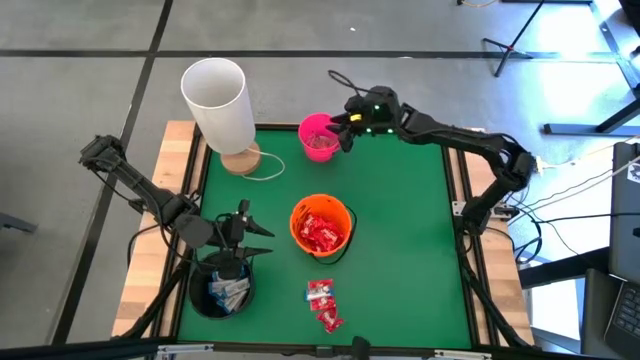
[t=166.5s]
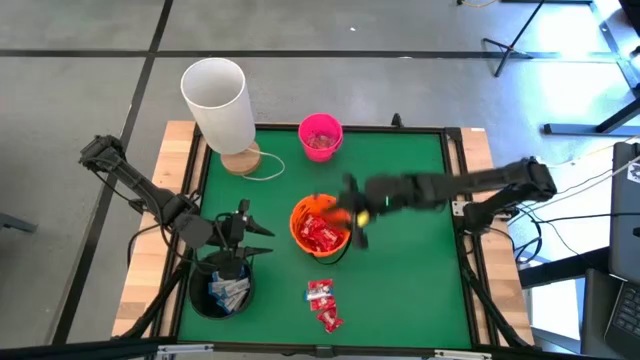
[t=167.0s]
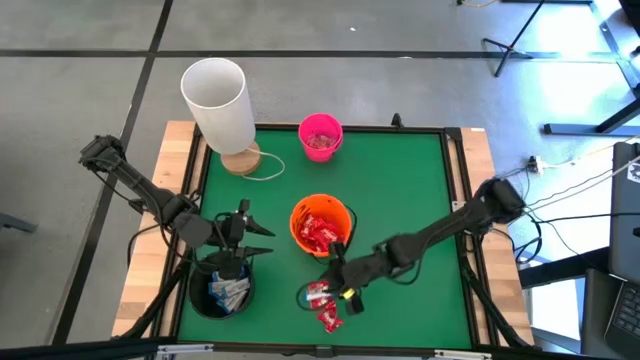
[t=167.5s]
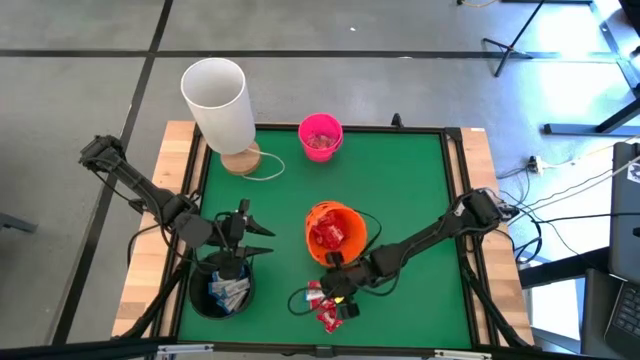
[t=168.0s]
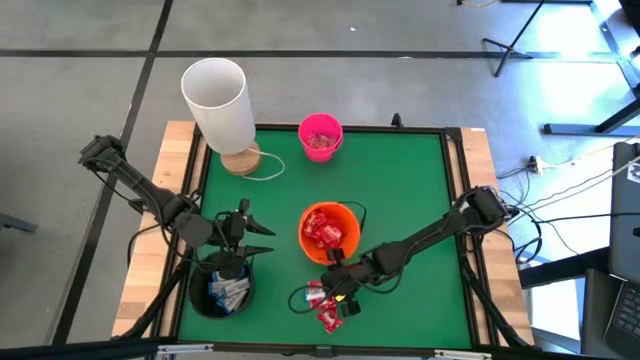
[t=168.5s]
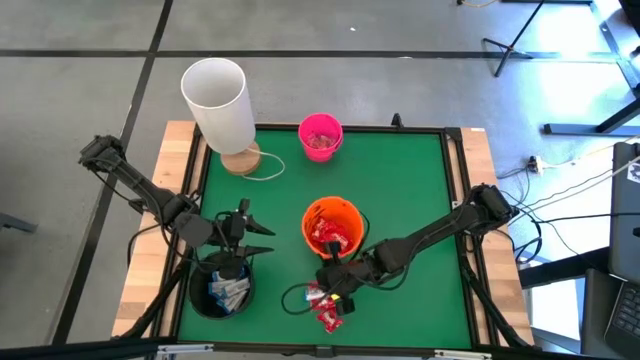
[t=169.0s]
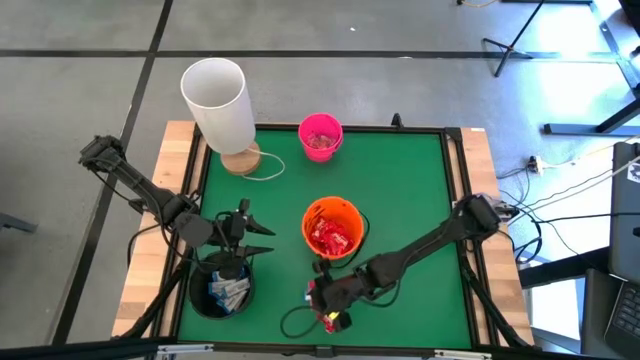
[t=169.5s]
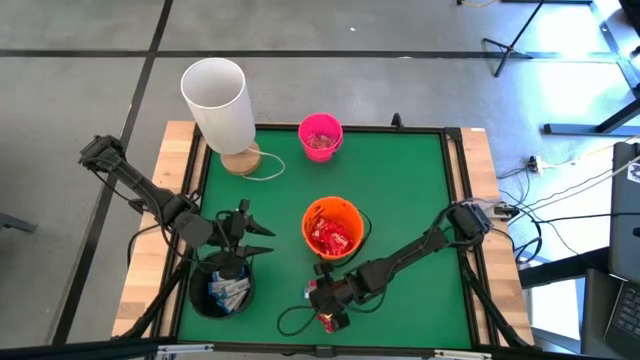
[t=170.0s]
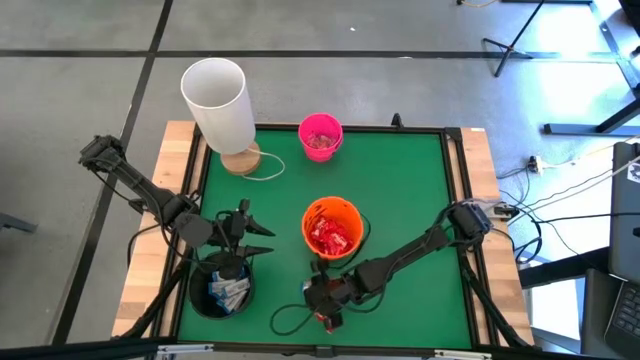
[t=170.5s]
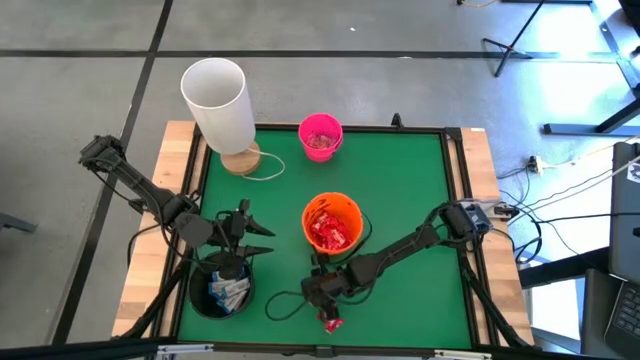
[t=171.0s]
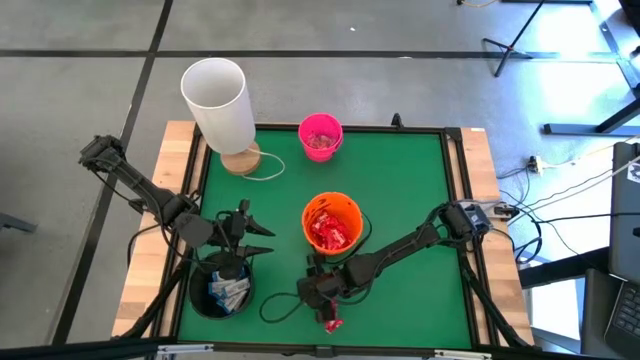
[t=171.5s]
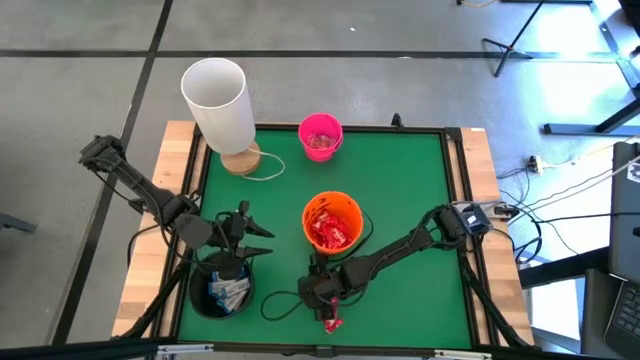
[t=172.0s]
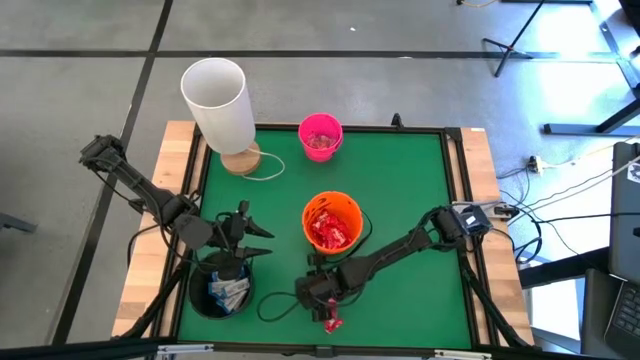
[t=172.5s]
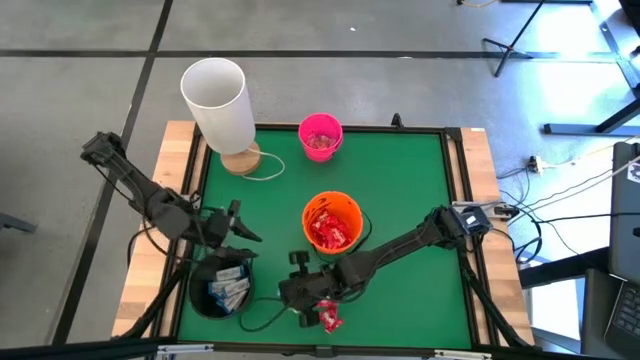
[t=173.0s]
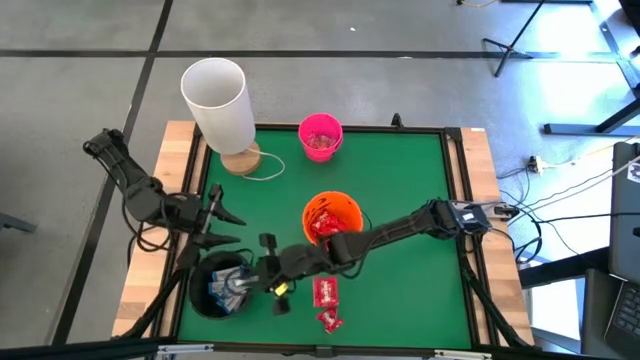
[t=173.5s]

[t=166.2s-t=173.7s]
Task: Sort candy
Put the white chocolate into the black bucket

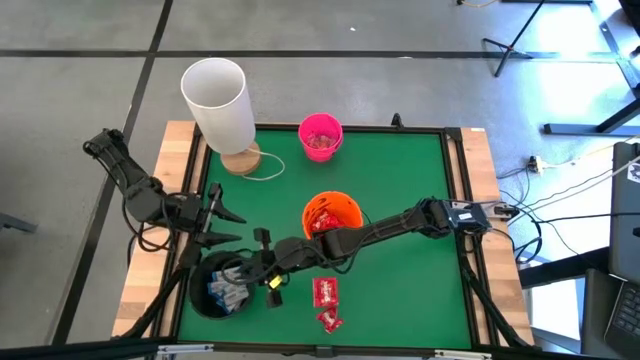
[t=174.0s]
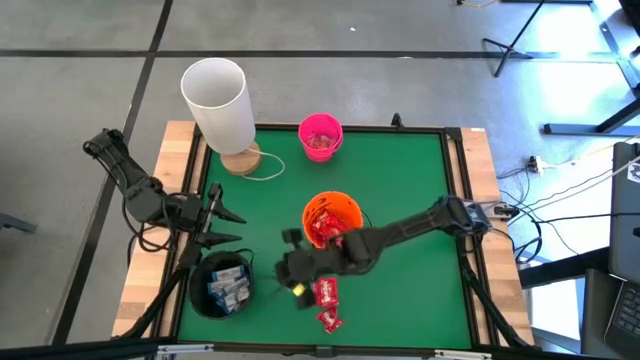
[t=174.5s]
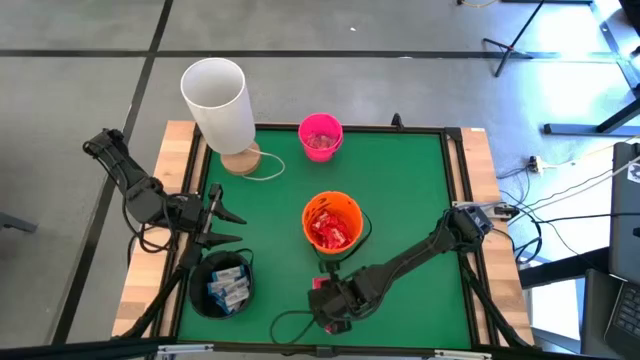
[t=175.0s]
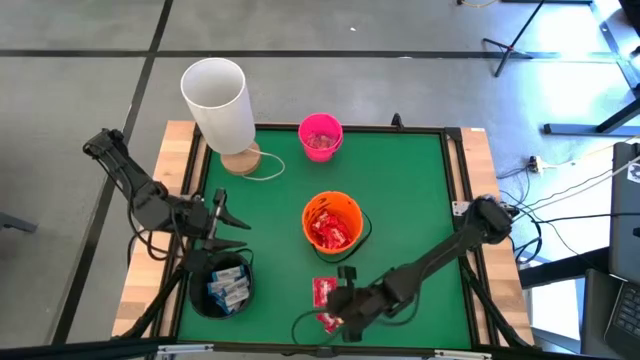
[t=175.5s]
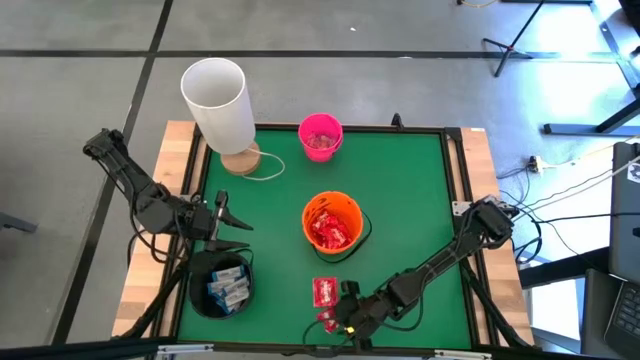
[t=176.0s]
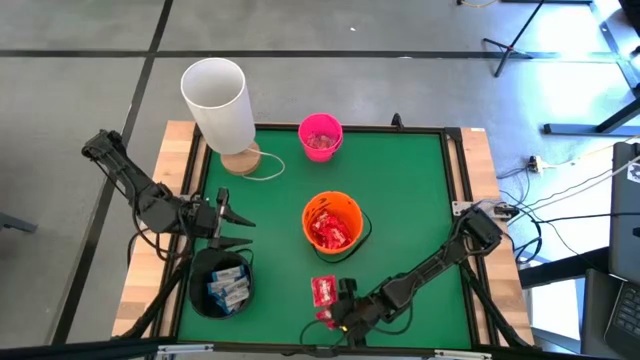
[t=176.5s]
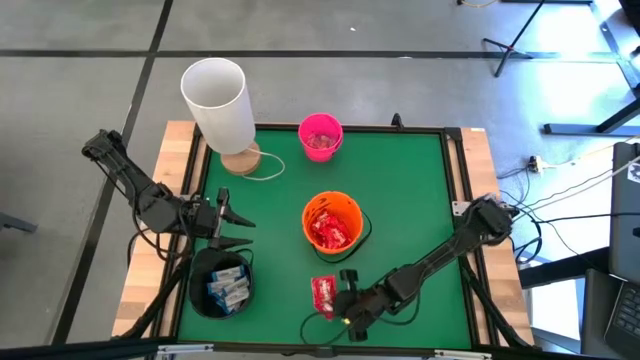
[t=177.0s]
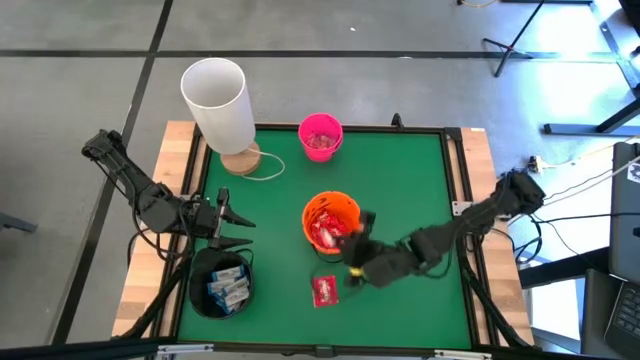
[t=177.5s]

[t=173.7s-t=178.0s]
Put the red candy into the orange bucket

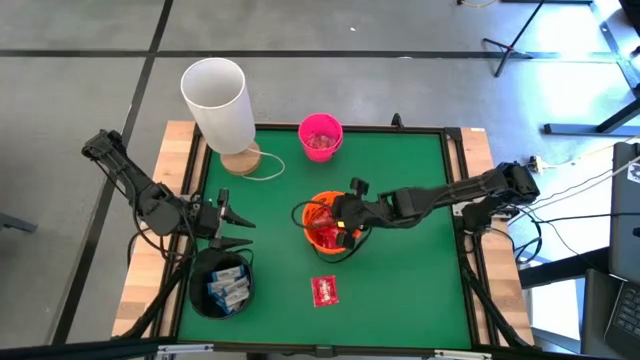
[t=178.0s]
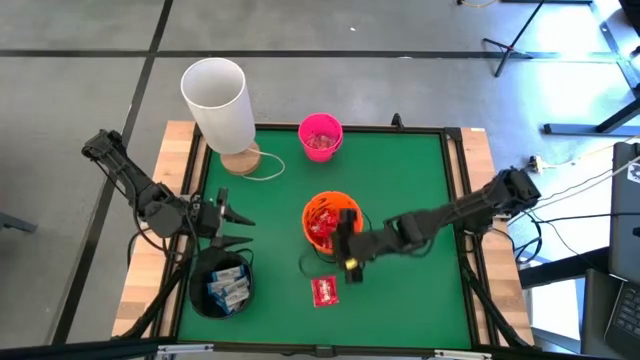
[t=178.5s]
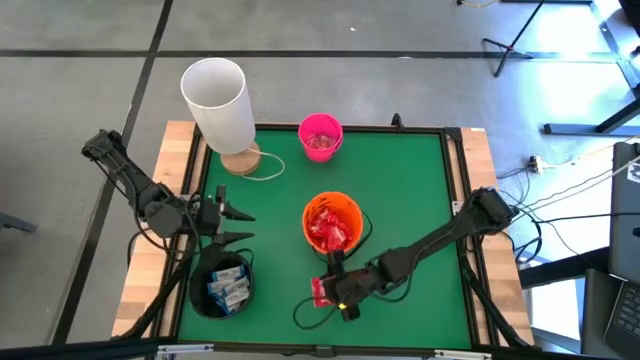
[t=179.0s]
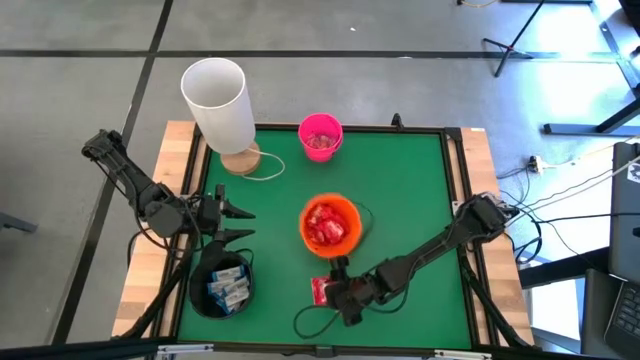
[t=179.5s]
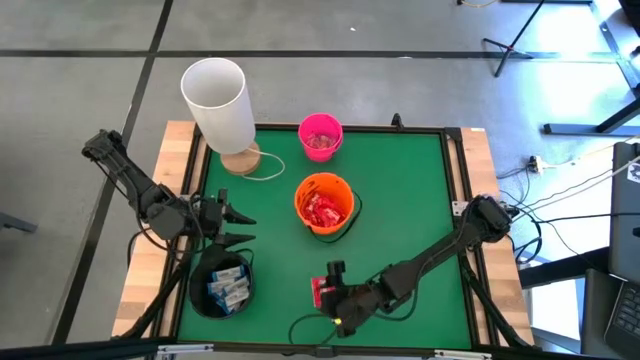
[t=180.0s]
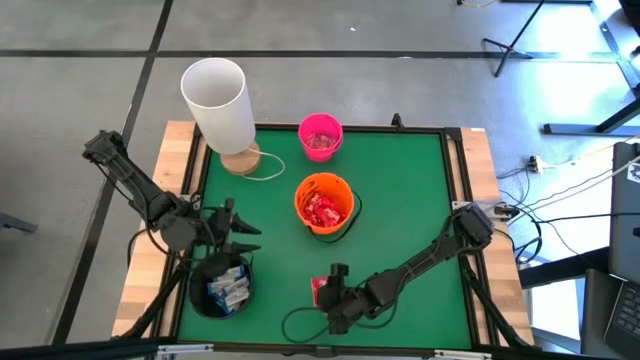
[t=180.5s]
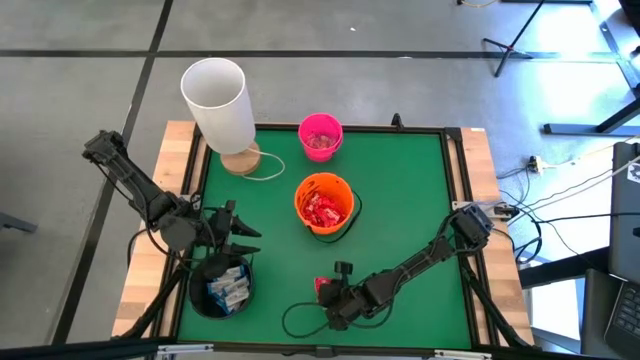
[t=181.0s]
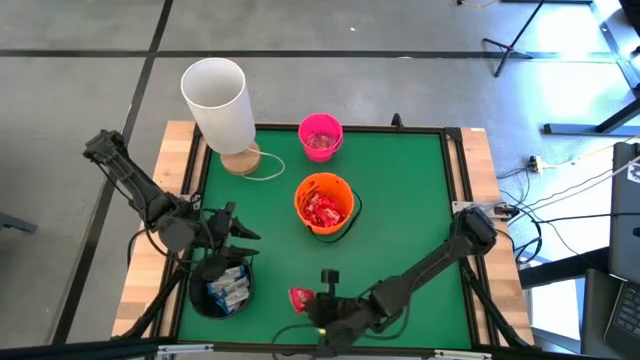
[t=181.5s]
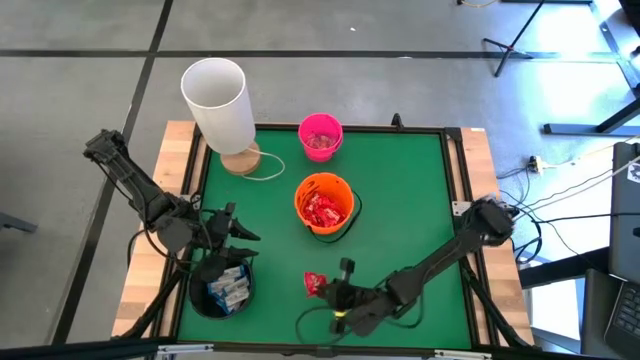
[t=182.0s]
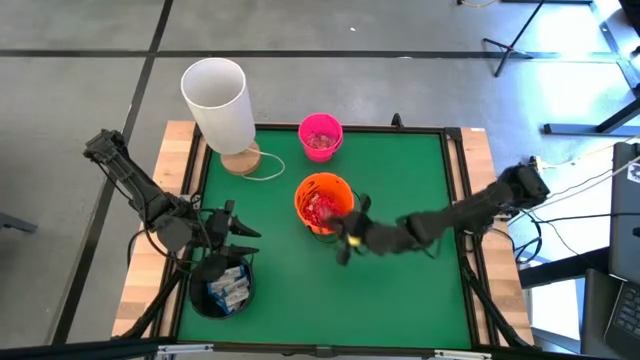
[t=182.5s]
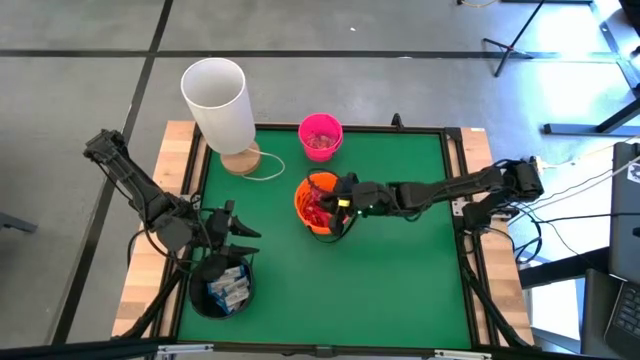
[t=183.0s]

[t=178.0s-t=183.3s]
Put the red candy into the orange bucket

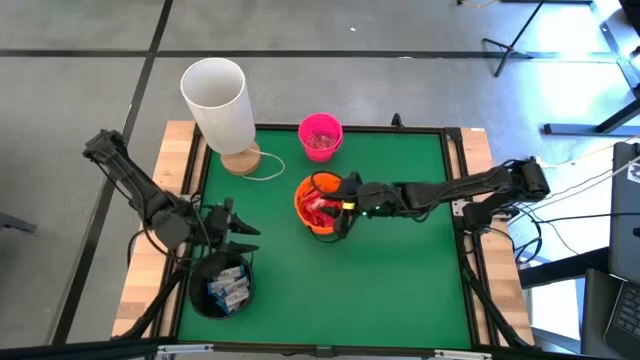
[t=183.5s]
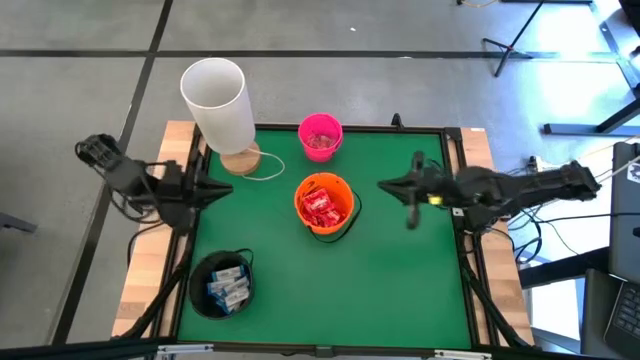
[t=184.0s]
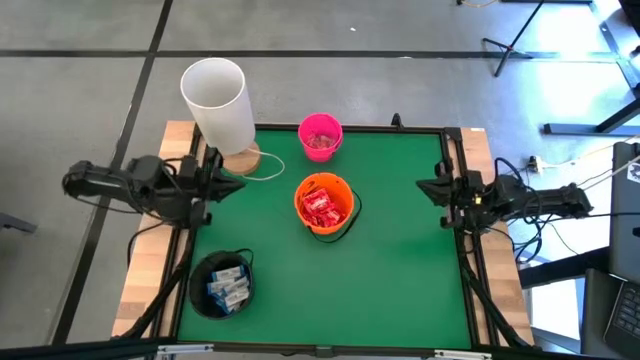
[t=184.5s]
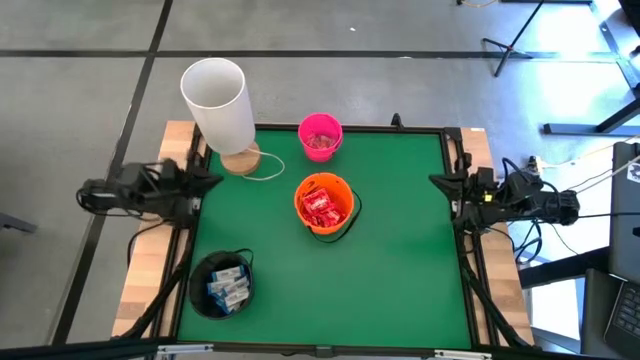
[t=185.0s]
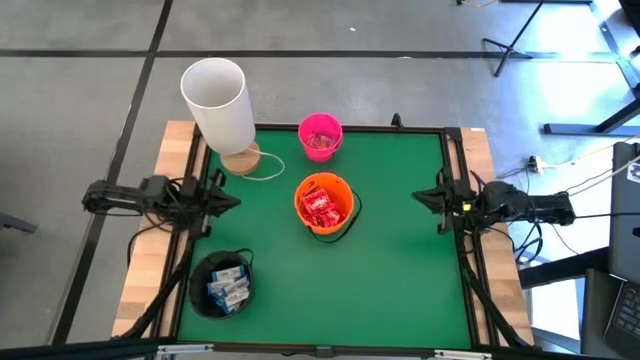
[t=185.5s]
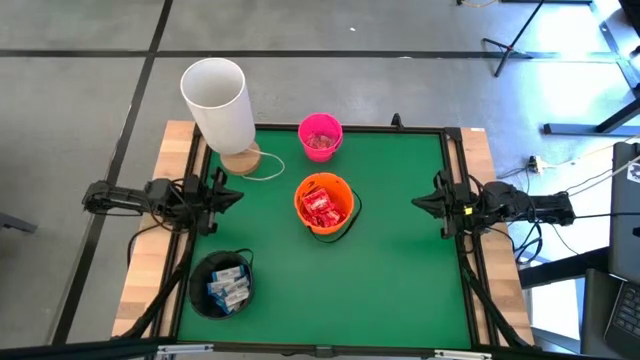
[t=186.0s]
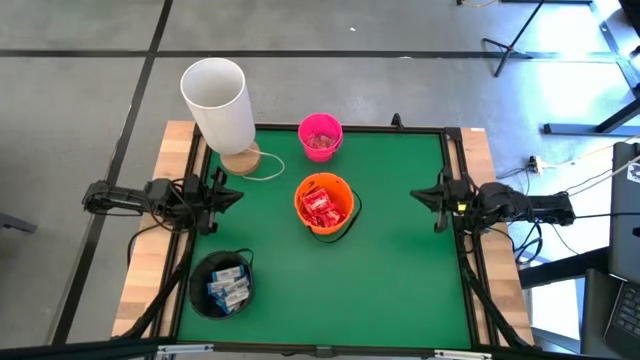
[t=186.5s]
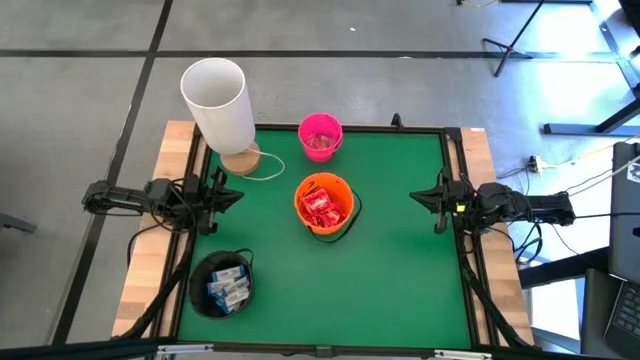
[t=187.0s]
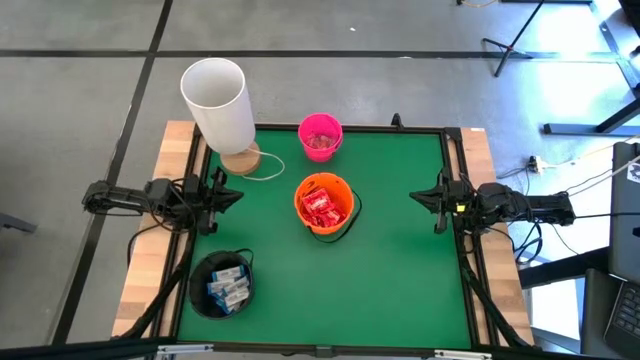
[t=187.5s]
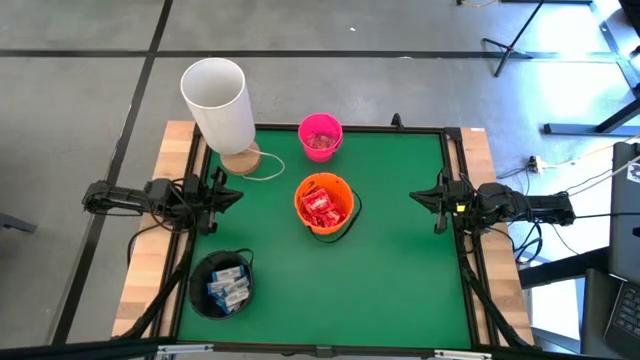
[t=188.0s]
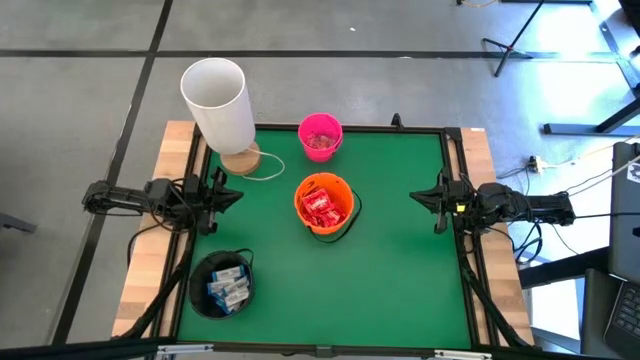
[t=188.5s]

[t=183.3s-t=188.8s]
Return to Home Position
